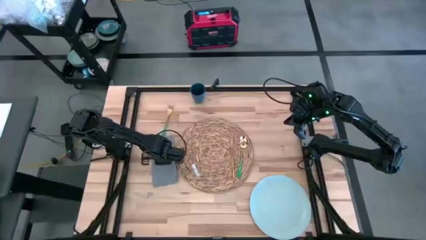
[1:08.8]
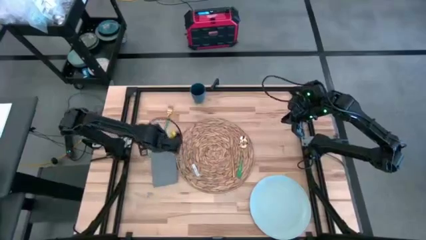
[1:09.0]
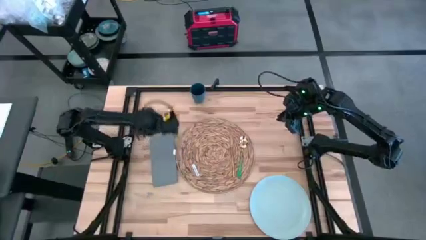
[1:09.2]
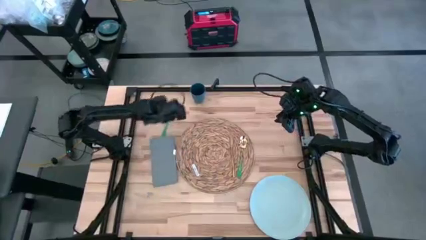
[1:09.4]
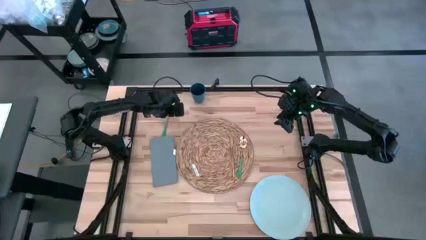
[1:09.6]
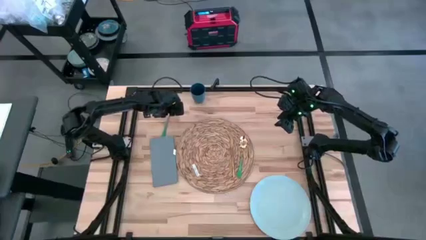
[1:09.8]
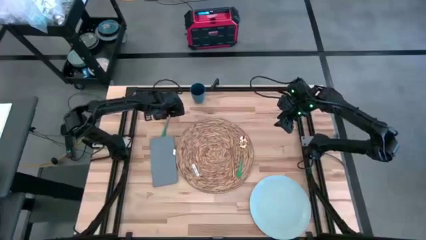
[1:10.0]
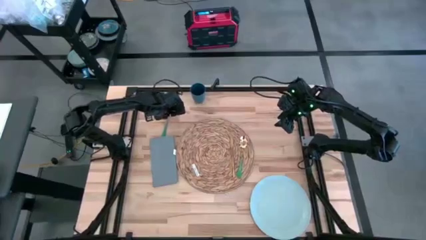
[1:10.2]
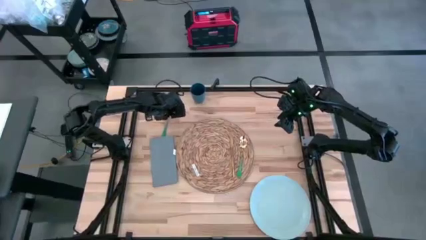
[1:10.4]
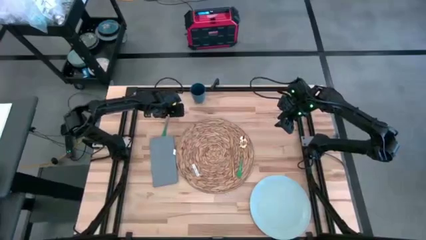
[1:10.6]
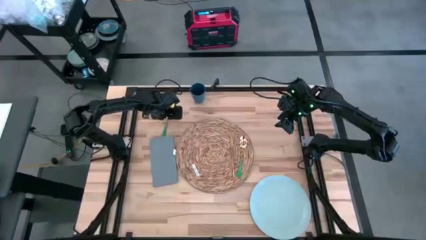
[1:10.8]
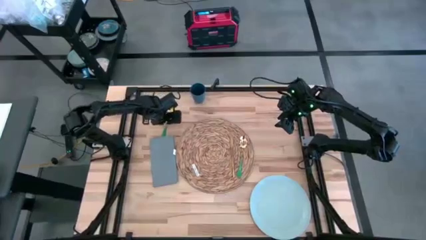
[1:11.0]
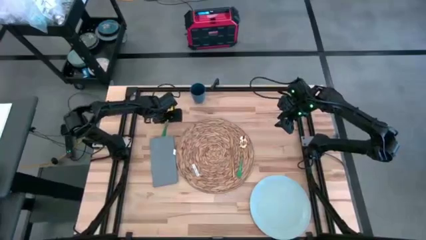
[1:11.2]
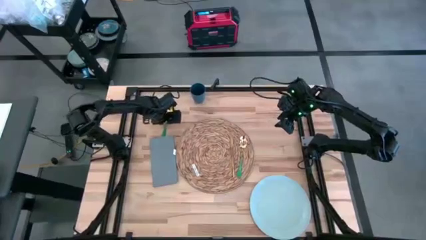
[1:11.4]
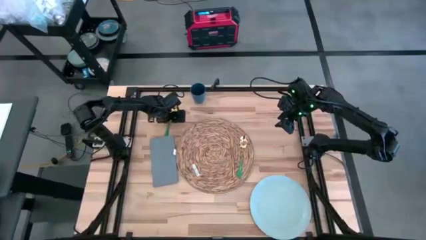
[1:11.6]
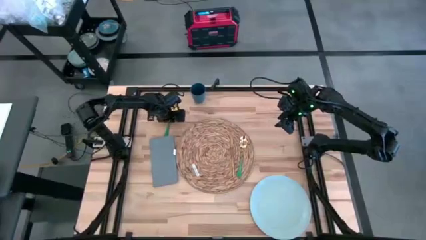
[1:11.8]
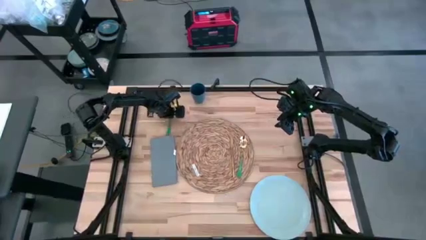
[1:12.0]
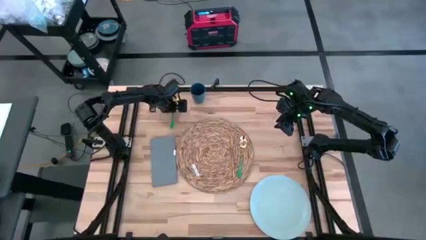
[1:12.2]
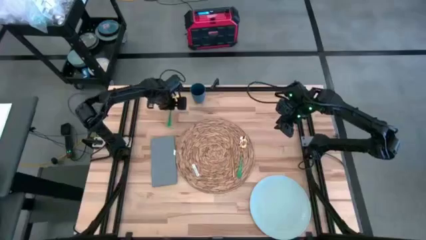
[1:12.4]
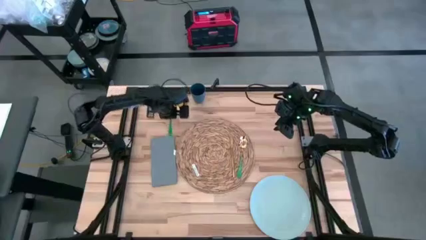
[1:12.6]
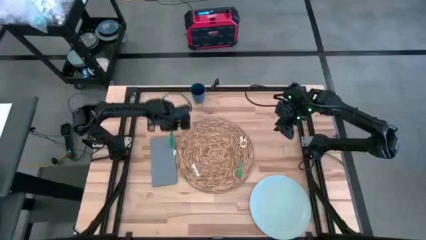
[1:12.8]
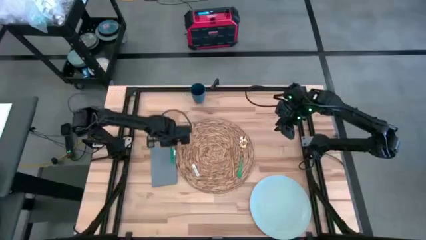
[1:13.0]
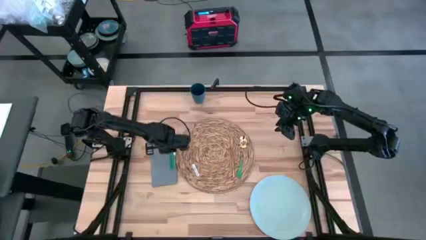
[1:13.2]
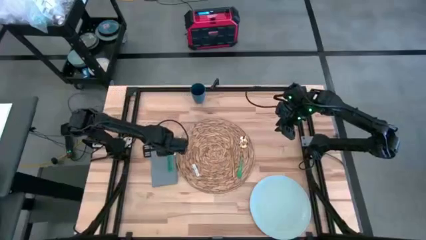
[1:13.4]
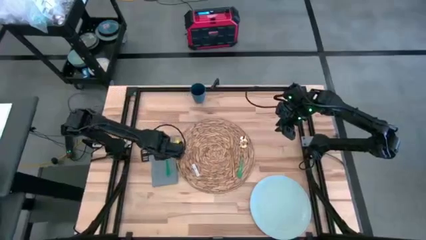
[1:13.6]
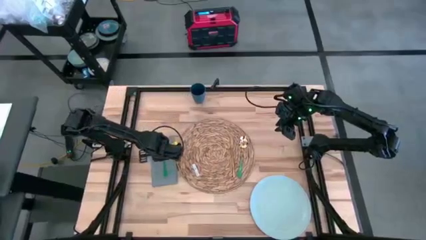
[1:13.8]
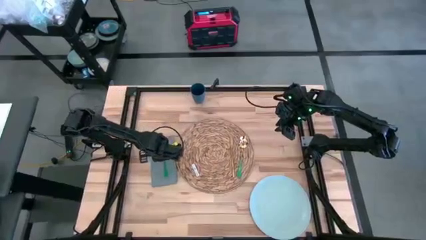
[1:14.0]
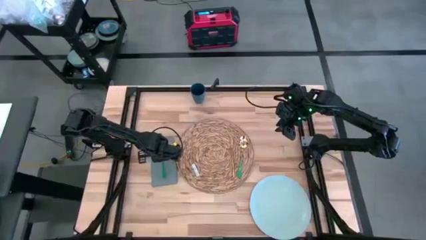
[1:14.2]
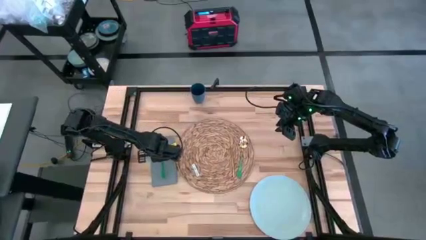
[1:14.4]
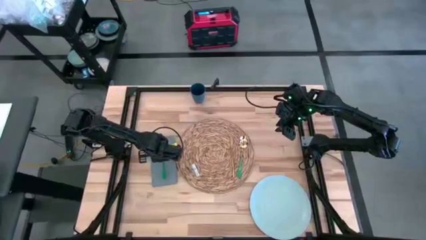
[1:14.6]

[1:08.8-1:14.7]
Task: Set table place
Put the green fork on the gray table napkin

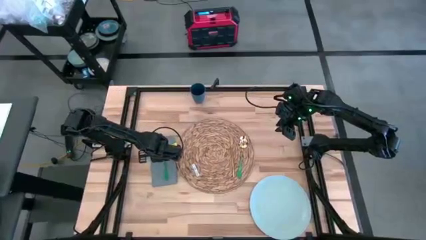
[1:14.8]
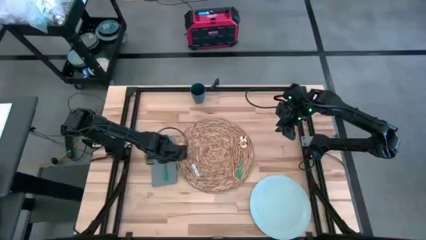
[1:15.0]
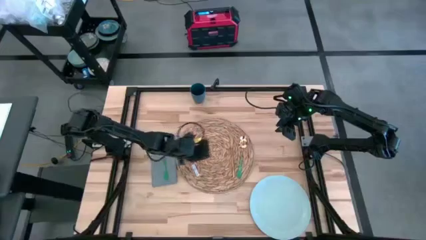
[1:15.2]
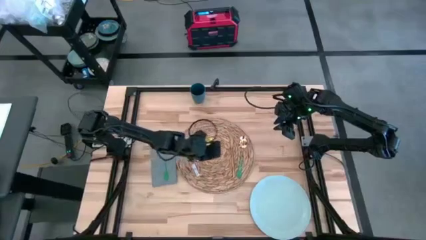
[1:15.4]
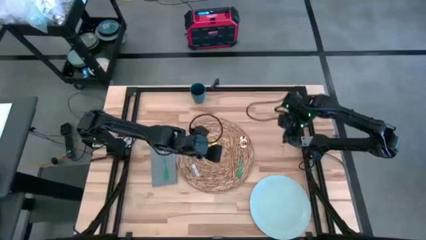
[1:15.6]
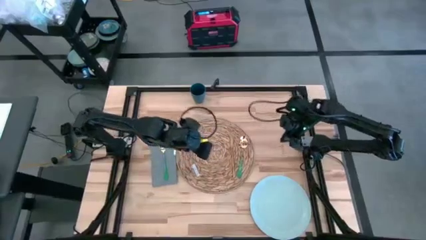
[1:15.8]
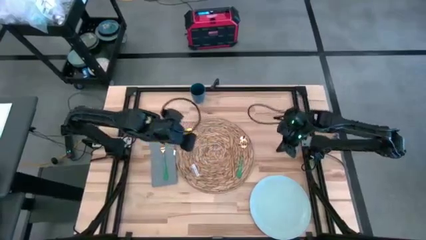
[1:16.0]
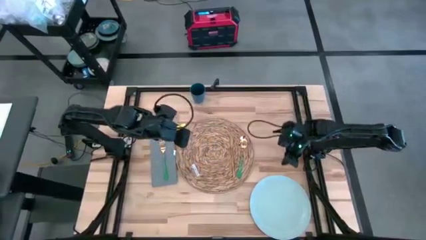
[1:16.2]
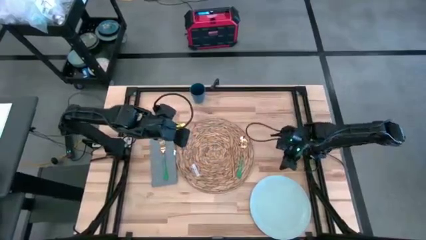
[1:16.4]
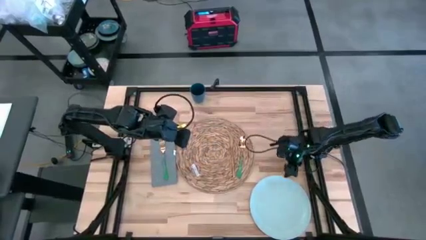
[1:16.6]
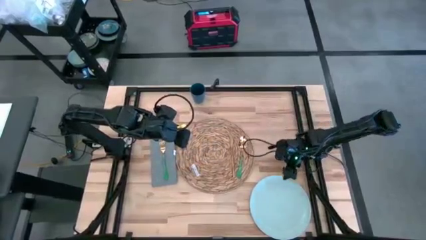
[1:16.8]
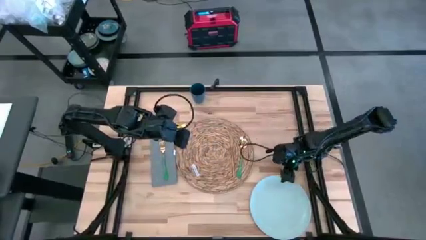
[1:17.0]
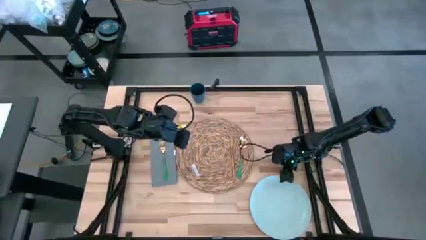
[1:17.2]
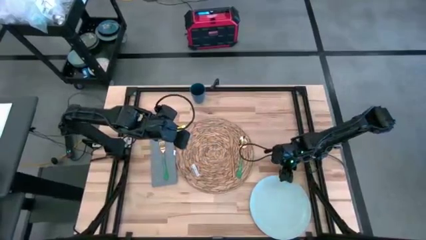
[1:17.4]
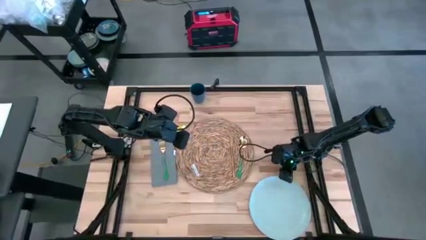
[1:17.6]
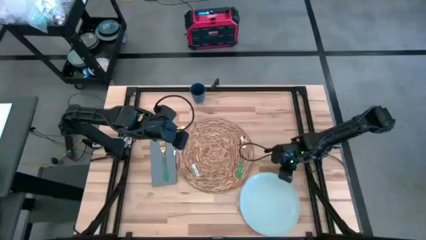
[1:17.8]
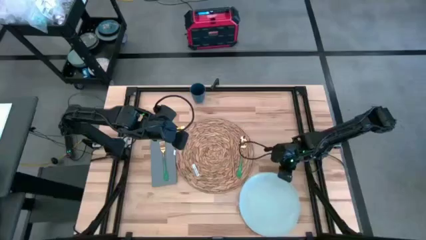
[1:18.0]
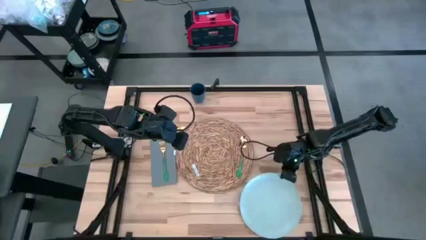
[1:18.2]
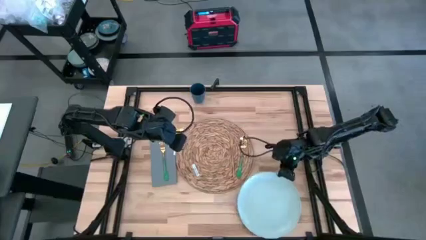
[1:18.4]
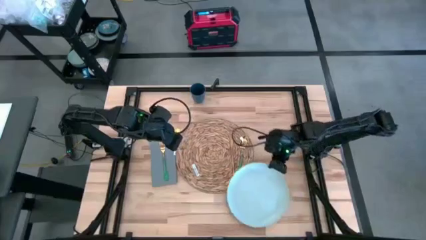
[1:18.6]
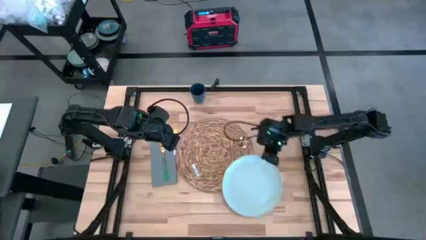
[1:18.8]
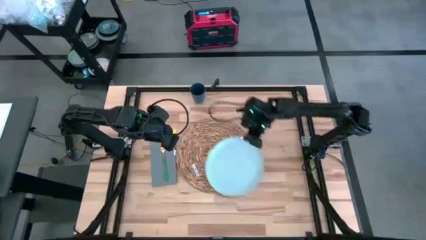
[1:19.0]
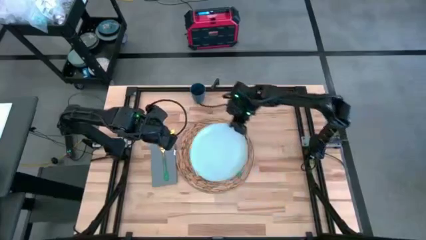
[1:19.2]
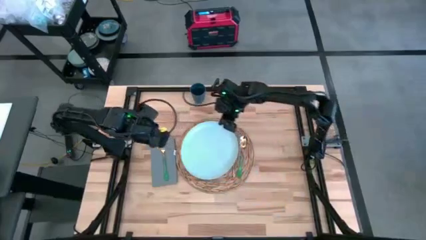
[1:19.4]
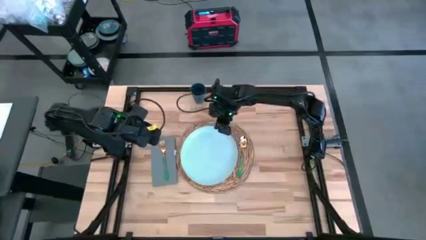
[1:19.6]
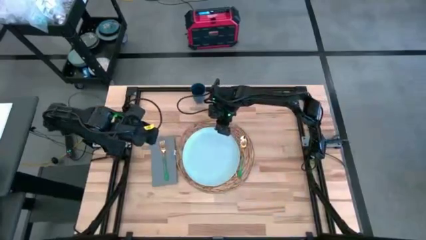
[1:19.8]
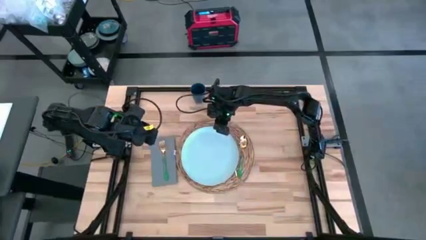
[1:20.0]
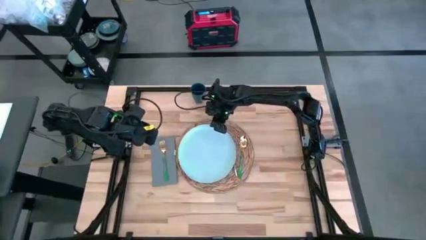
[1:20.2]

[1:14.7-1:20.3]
Put the white plate on the tablemat to the left of the gold table knife
